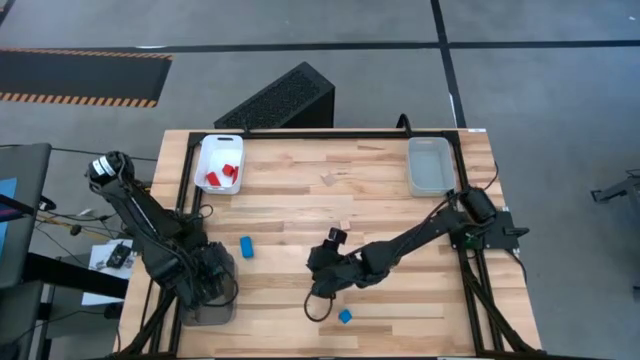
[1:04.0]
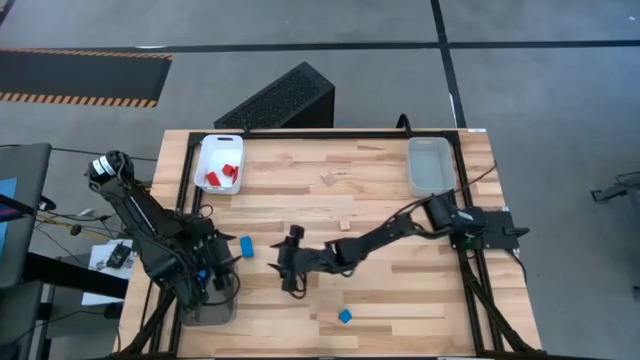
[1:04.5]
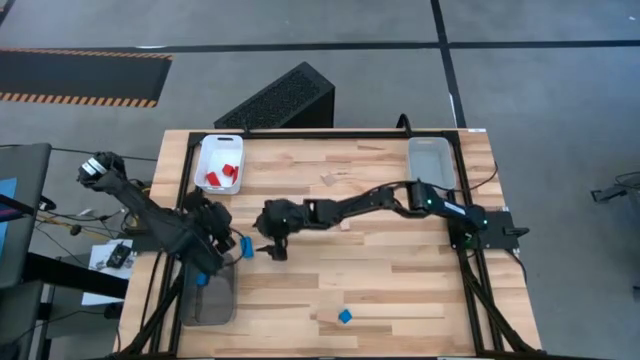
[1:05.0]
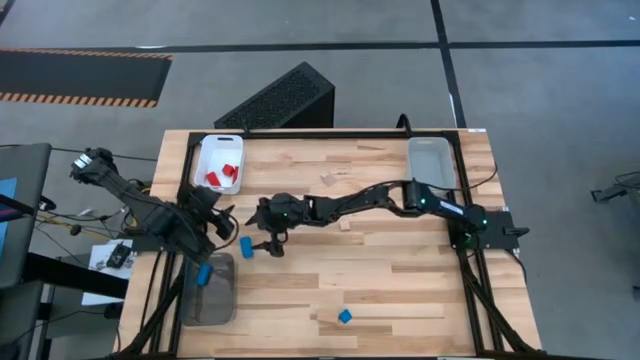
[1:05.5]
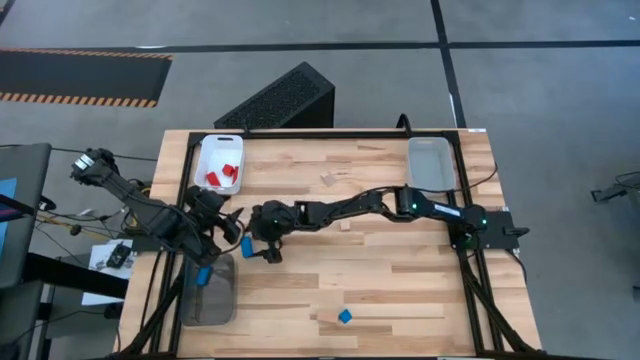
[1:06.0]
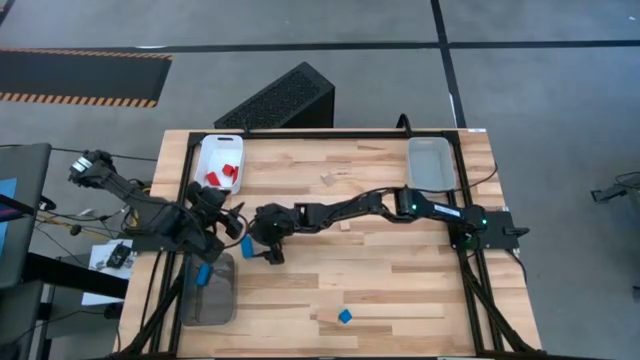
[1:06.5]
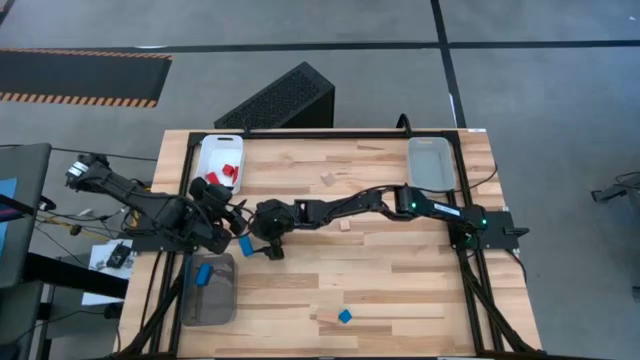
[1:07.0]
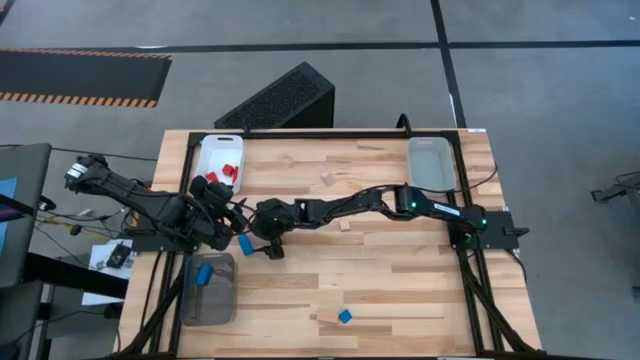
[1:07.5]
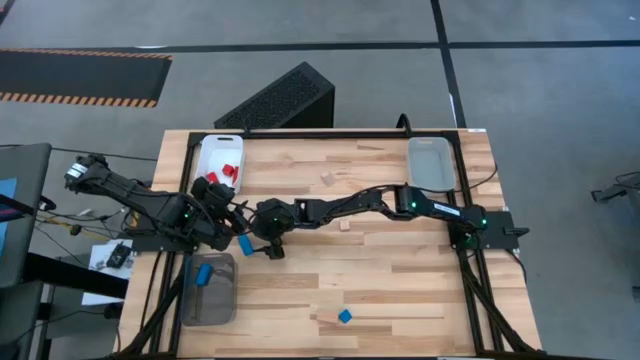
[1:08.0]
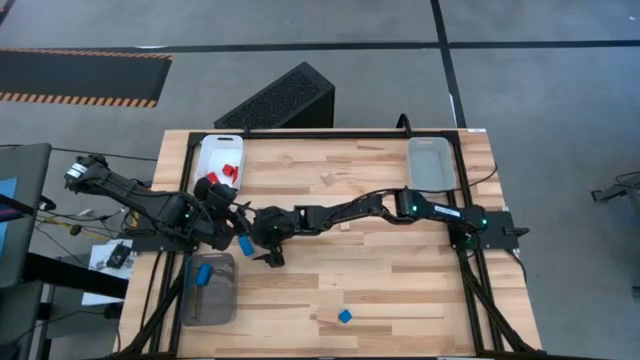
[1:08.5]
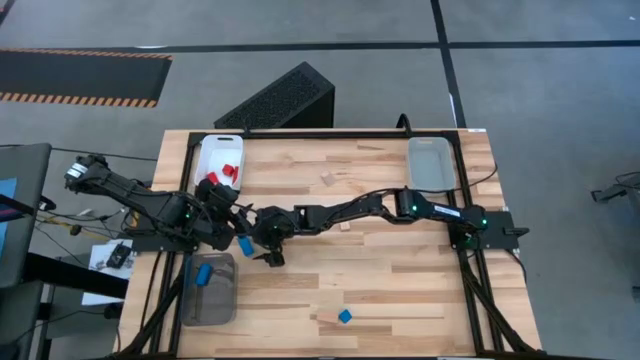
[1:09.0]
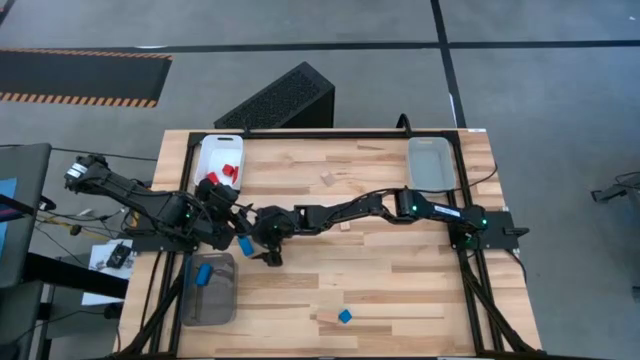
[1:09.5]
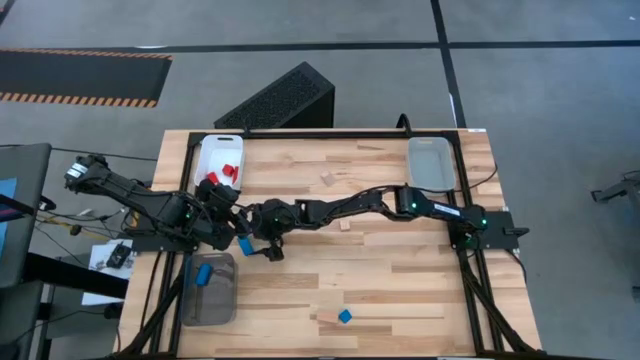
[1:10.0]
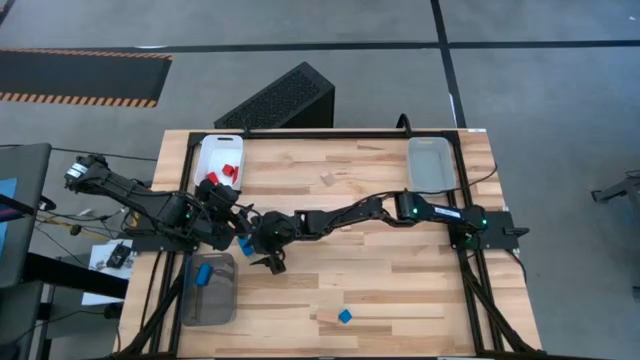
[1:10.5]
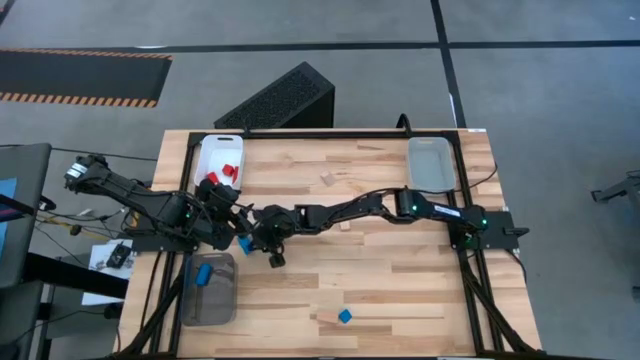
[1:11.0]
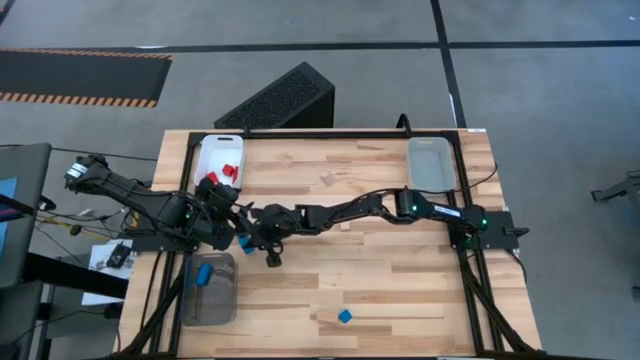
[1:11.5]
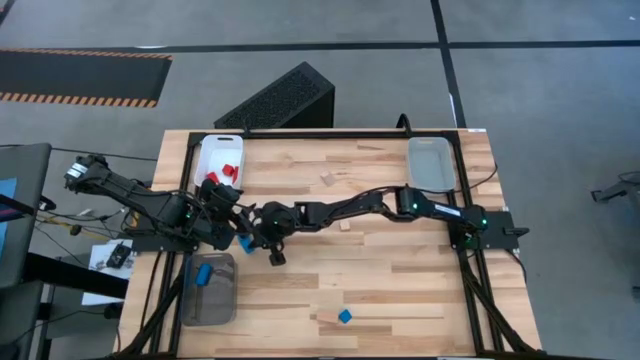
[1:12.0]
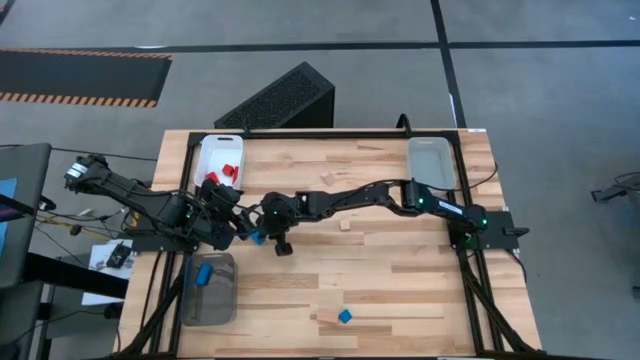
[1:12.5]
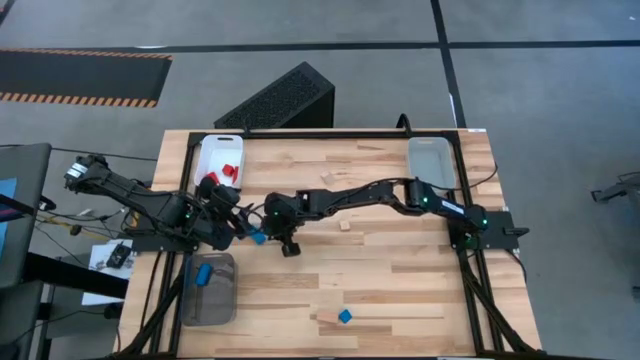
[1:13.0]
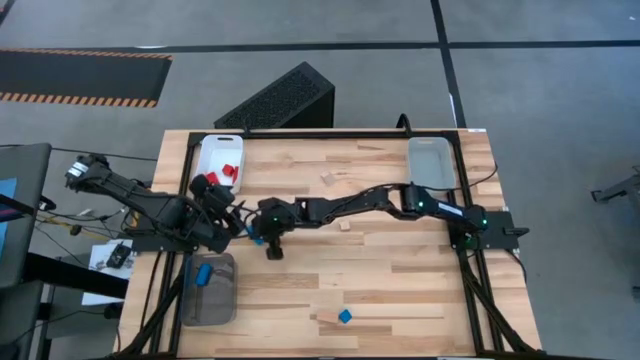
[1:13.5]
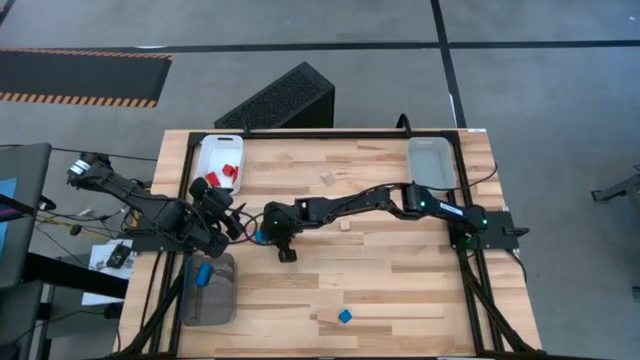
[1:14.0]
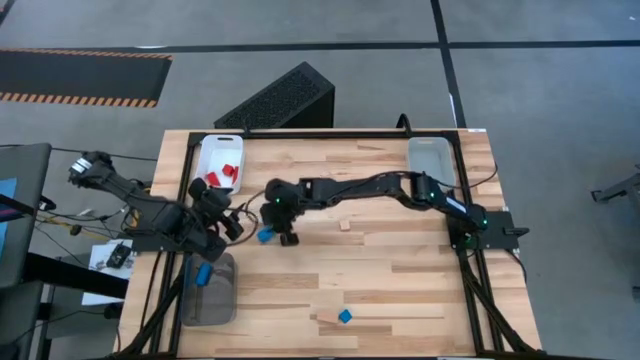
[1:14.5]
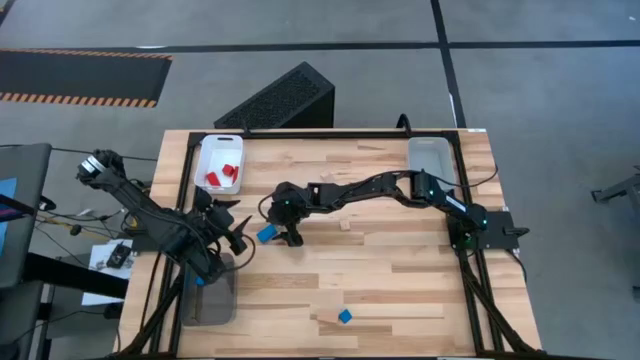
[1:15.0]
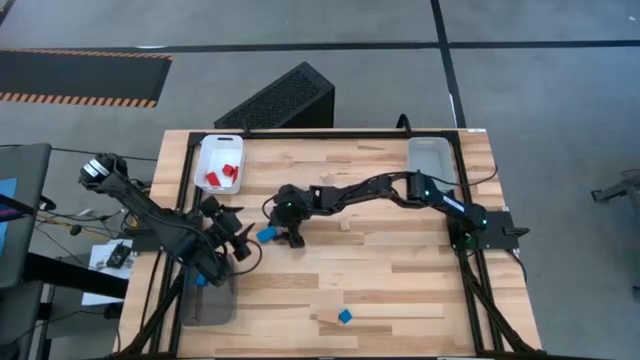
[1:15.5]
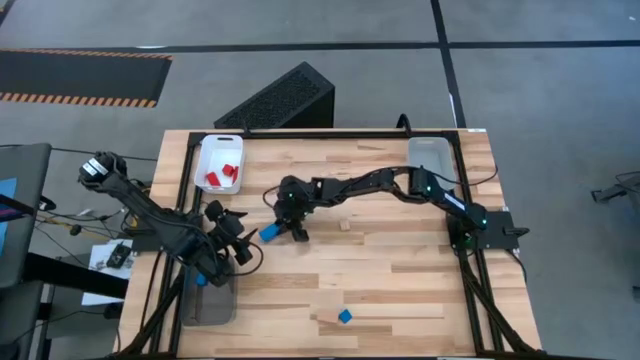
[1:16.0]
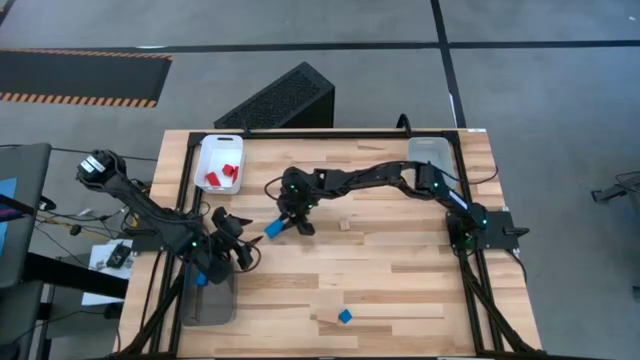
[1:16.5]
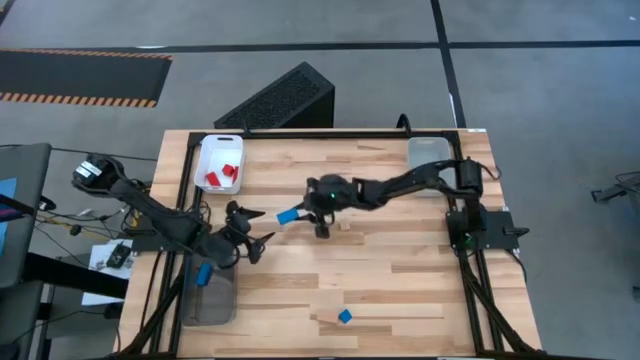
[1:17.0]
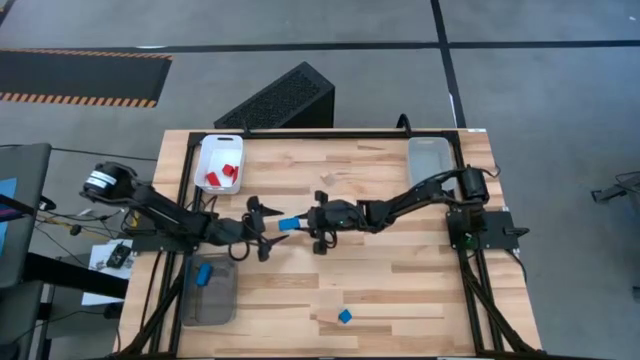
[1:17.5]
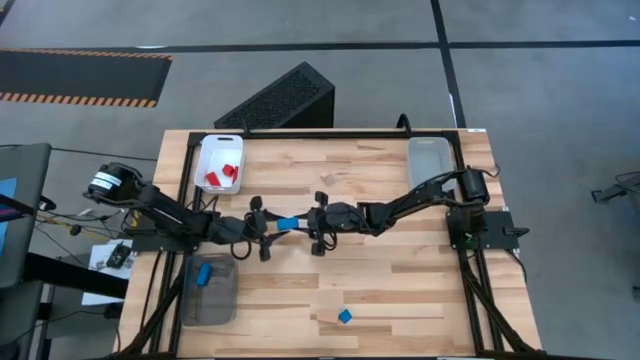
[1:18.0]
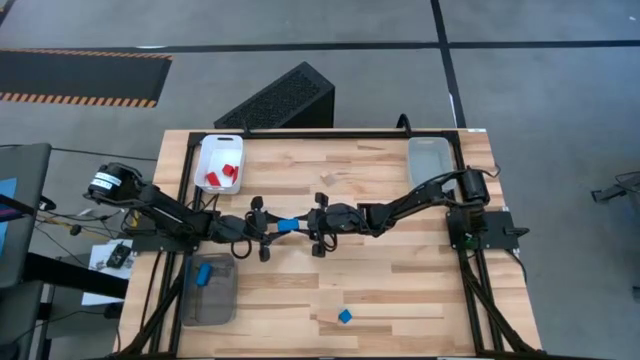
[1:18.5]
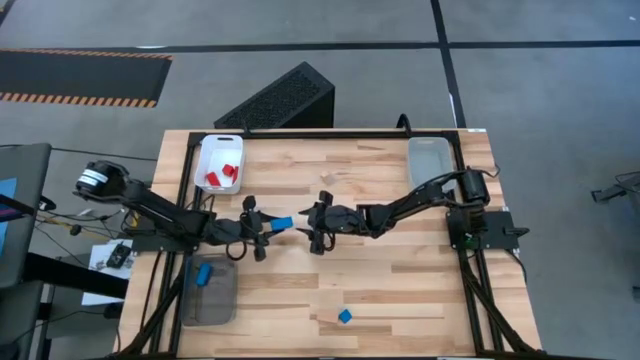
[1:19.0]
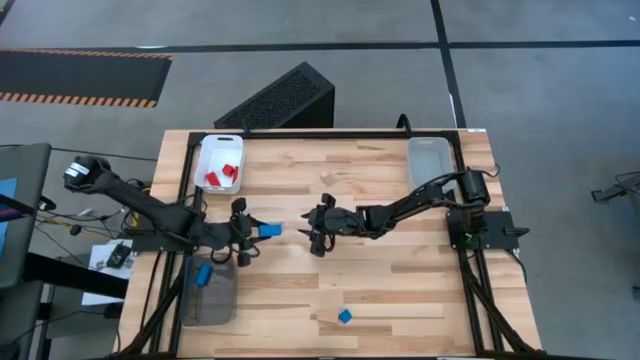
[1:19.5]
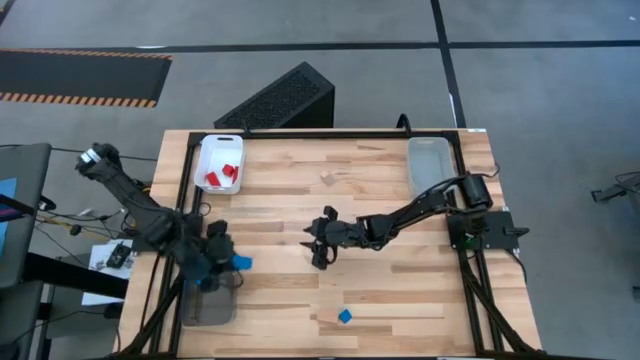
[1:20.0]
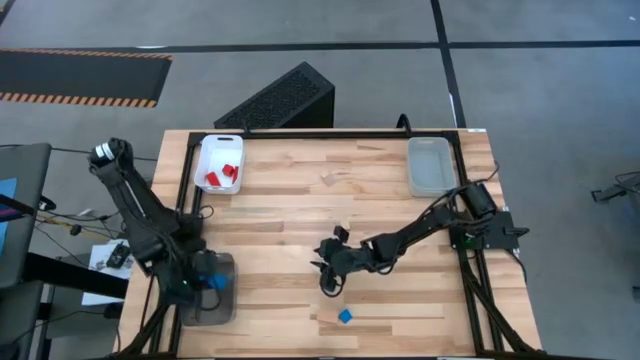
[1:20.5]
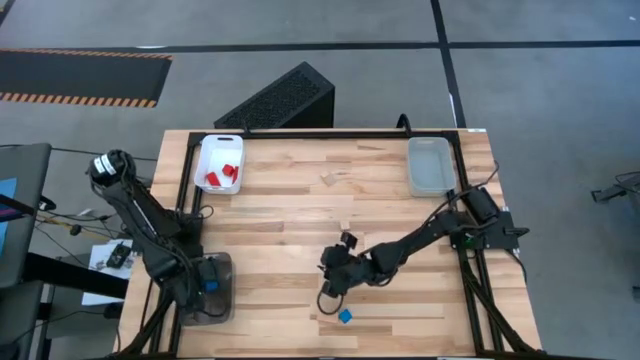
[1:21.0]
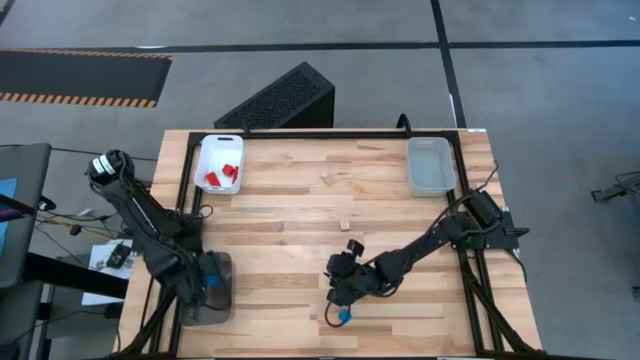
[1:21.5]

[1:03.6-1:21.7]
Task: Sort & place blocks by color
Put the top blue block into the black bin
